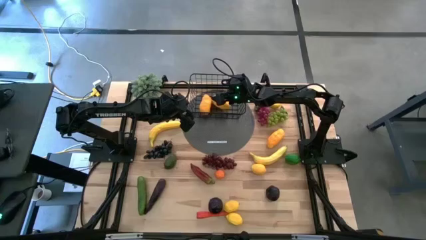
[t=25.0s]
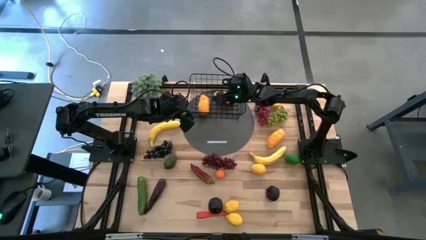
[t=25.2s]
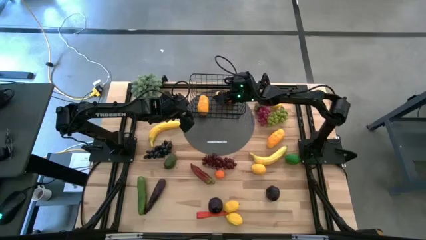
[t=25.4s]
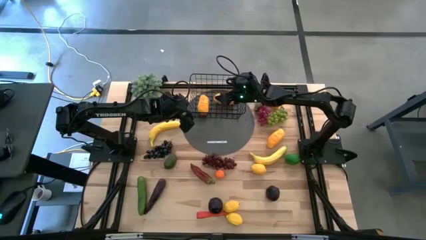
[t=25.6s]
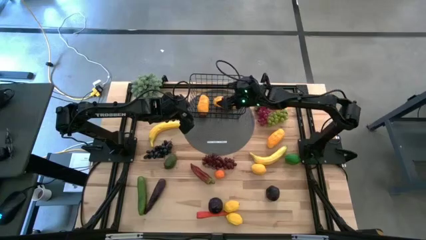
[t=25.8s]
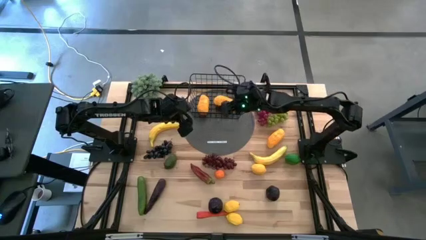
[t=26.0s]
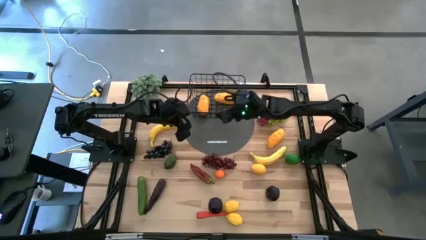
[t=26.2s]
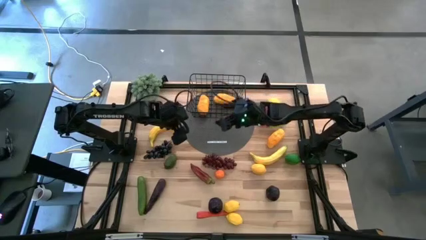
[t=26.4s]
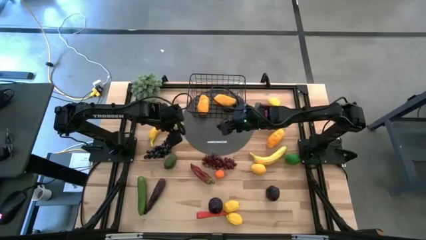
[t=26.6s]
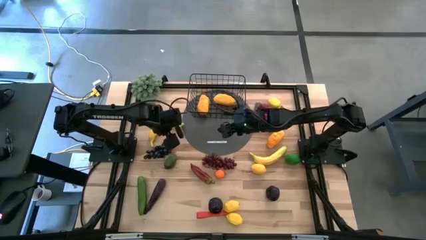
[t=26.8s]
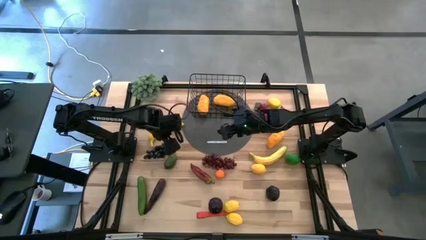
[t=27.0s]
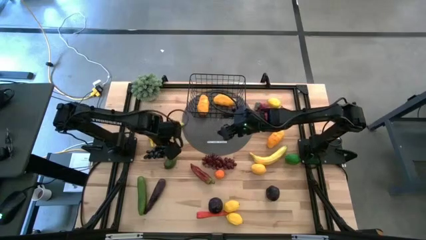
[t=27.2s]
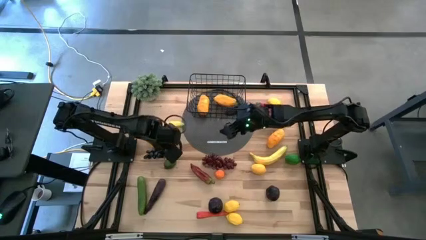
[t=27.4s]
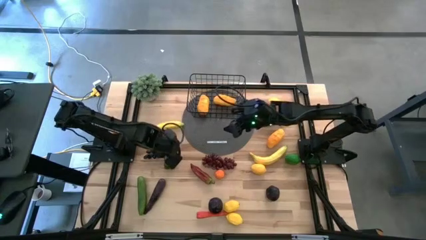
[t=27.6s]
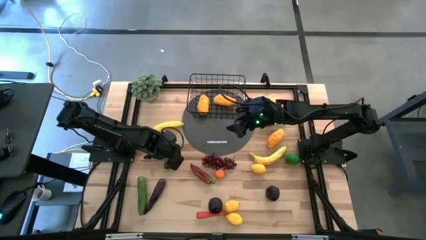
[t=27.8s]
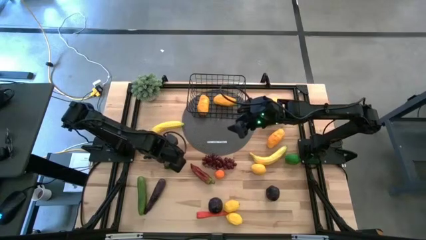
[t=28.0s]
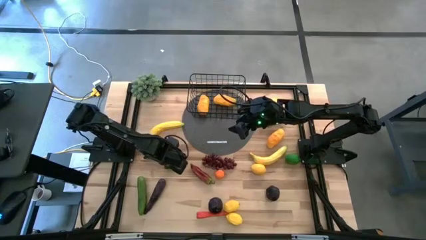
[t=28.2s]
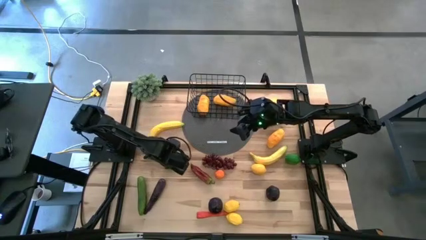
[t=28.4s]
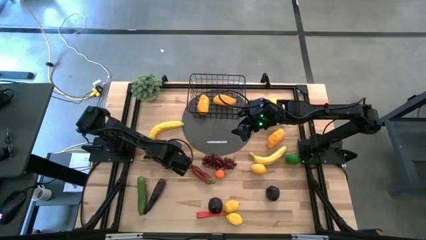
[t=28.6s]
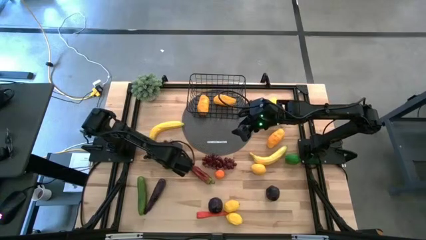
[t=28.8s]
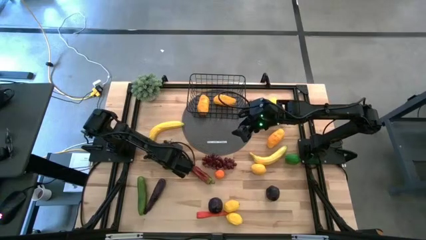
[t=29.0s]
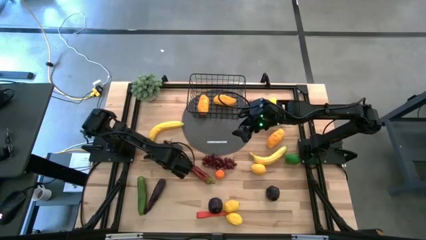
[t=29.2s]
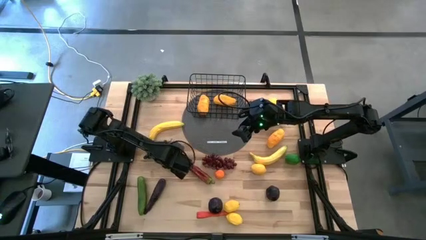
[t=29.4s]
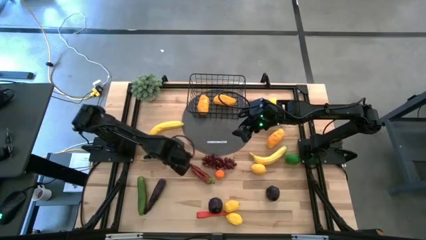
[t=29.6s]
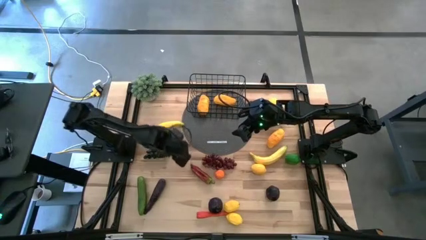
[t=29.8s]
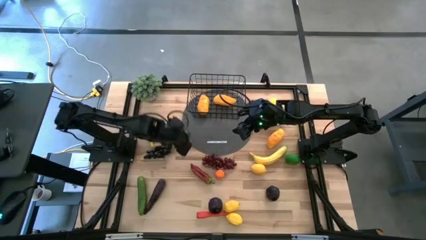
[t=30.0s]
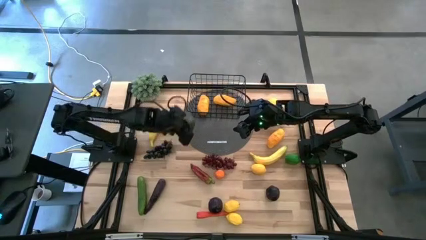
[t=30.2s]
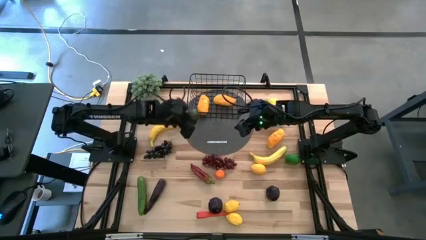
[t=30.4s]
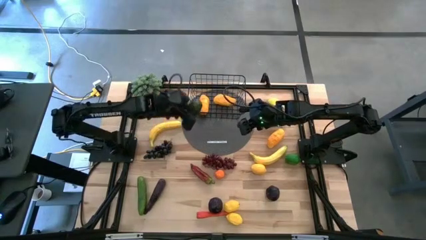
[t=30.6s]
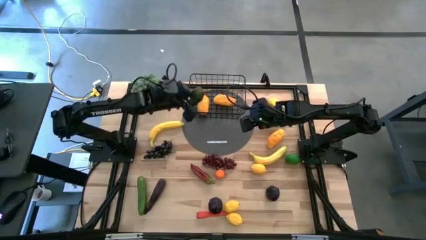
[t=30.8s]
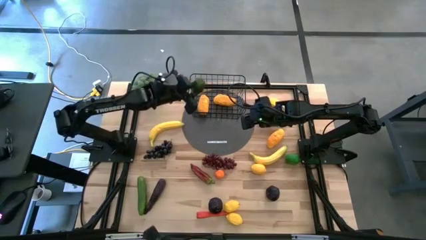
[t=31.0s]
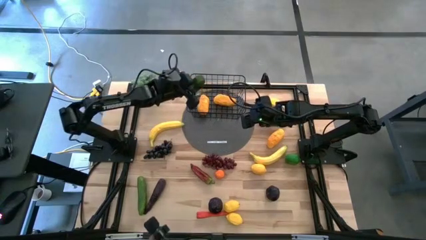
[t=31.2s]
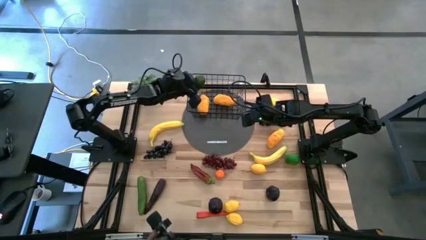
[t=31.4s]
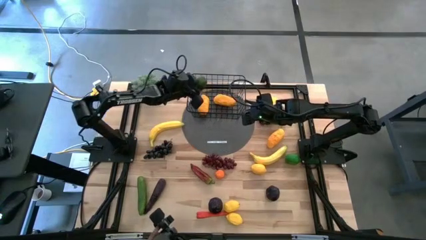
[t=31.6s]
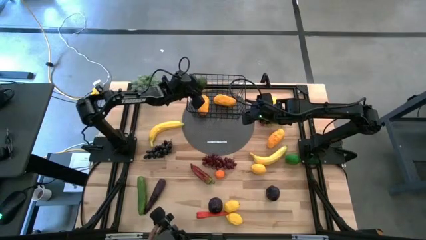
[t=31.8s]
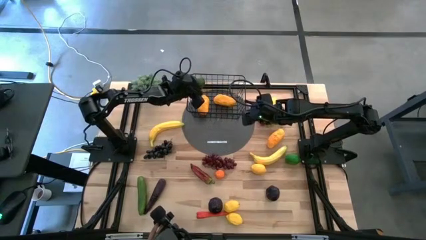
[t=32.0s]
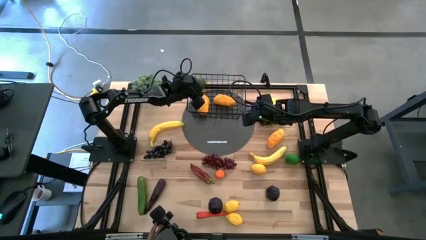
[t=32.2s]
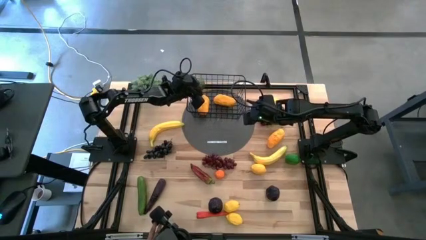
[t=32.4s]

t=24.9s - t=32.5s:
Task: Build produce basket
Put the left green lime into the black wire basket
